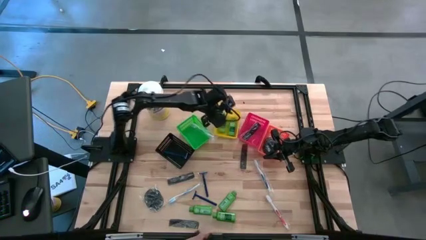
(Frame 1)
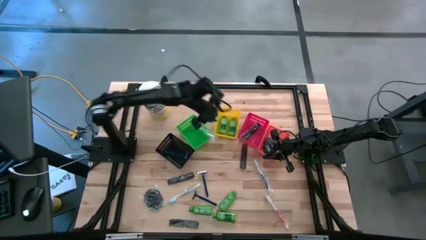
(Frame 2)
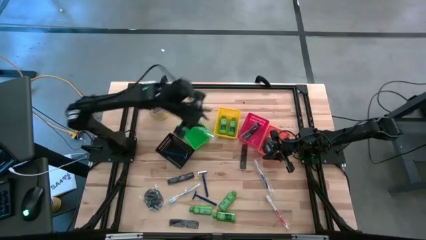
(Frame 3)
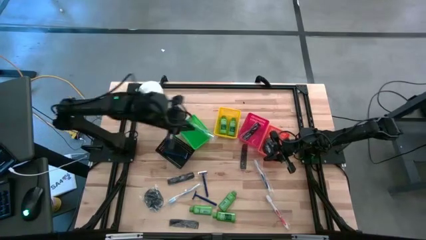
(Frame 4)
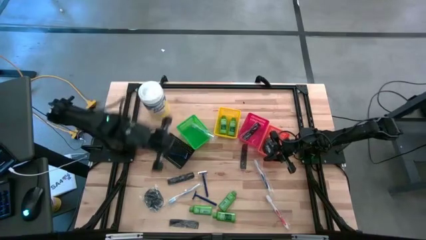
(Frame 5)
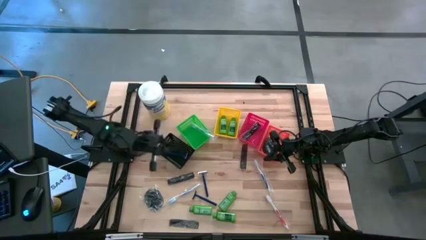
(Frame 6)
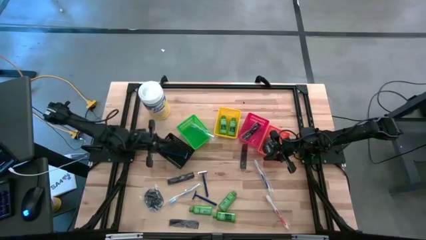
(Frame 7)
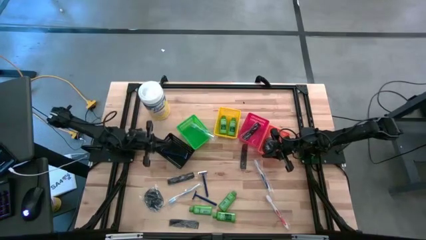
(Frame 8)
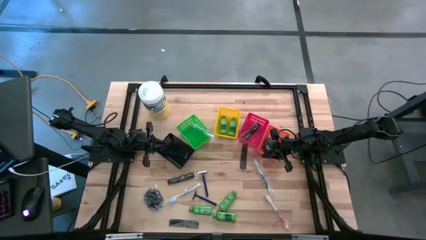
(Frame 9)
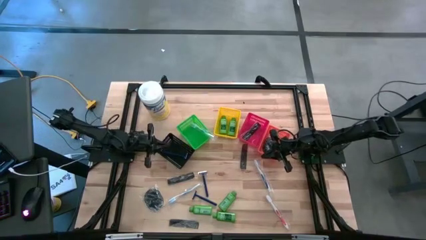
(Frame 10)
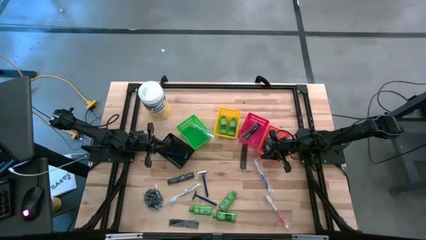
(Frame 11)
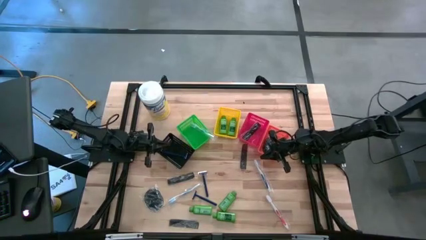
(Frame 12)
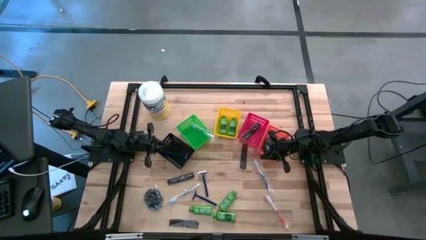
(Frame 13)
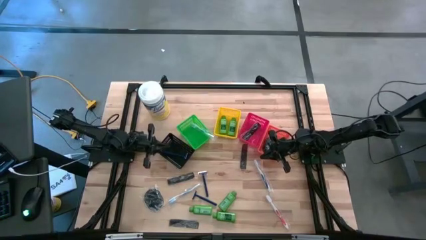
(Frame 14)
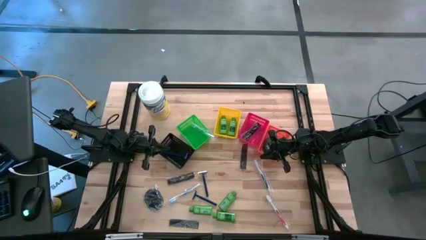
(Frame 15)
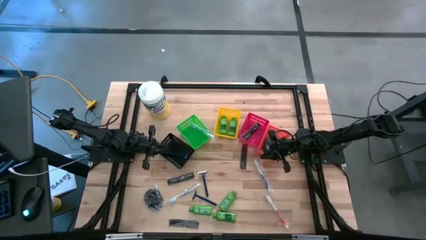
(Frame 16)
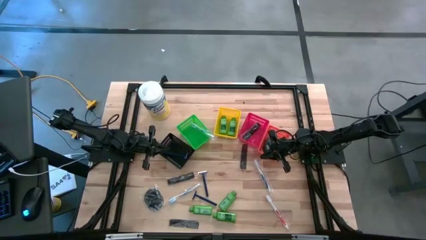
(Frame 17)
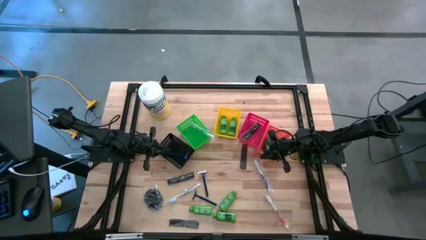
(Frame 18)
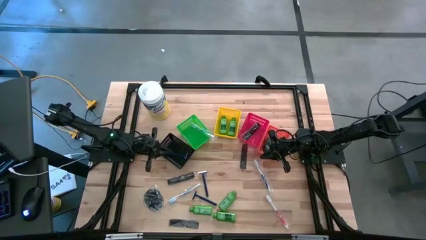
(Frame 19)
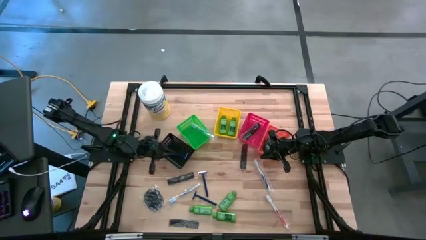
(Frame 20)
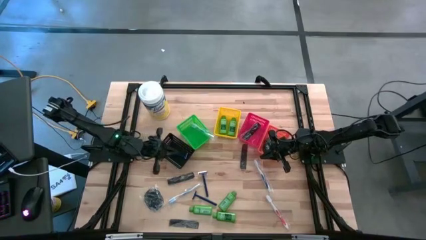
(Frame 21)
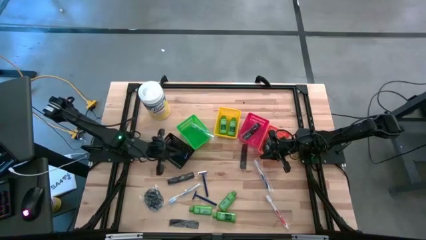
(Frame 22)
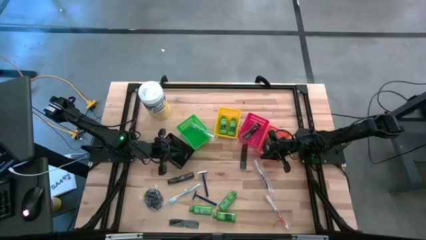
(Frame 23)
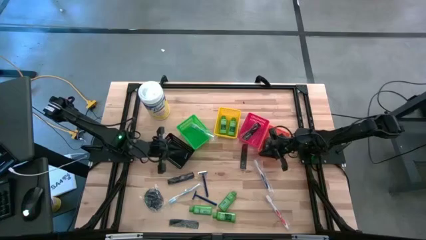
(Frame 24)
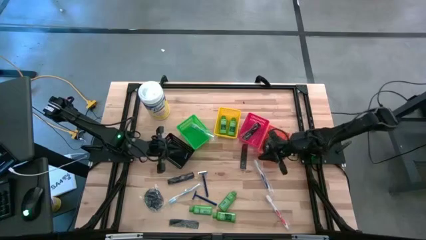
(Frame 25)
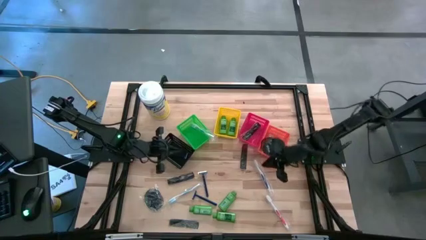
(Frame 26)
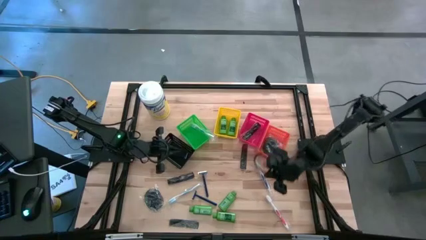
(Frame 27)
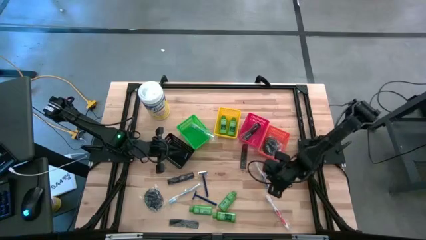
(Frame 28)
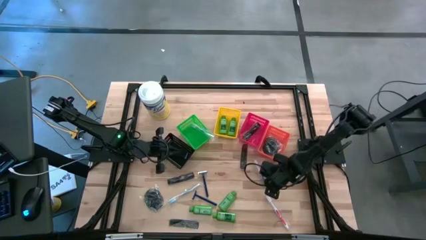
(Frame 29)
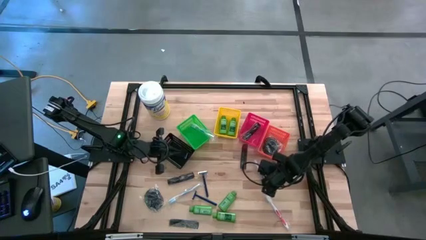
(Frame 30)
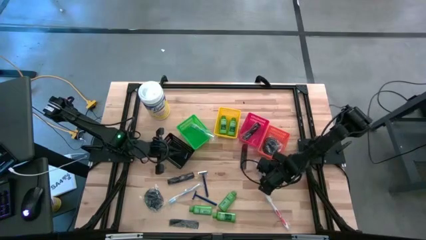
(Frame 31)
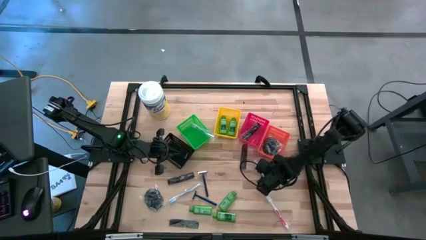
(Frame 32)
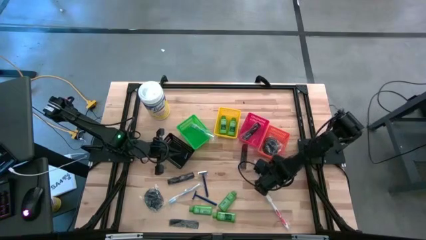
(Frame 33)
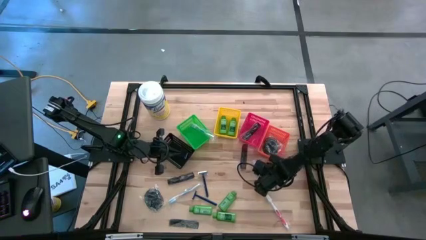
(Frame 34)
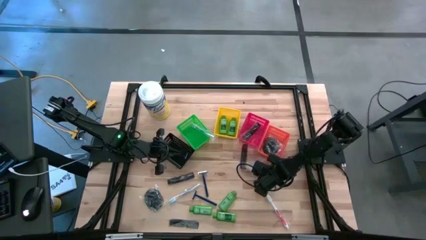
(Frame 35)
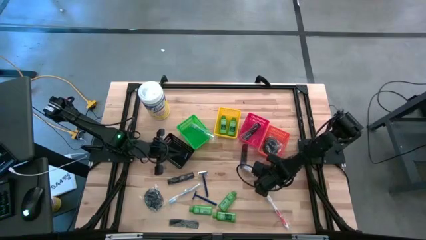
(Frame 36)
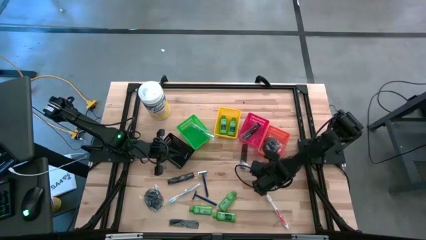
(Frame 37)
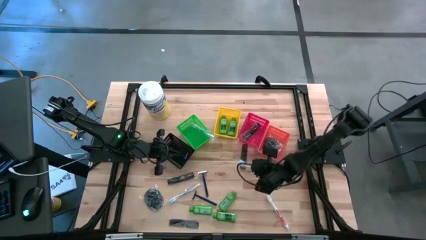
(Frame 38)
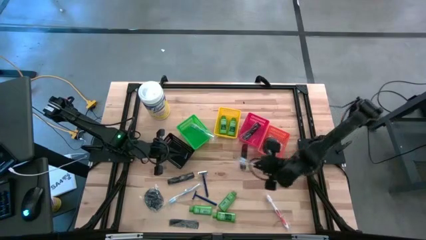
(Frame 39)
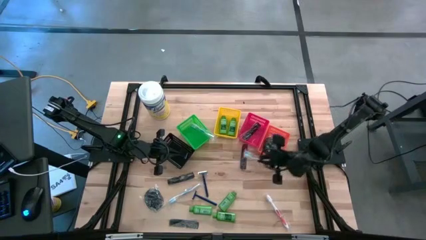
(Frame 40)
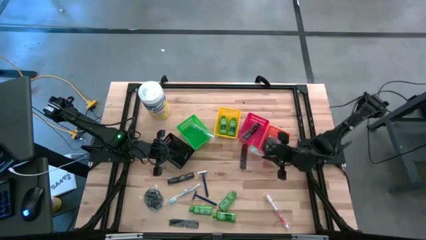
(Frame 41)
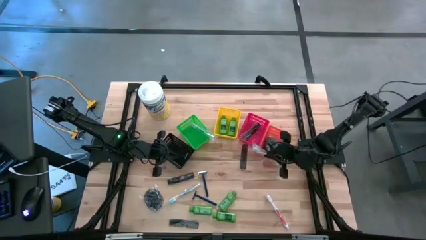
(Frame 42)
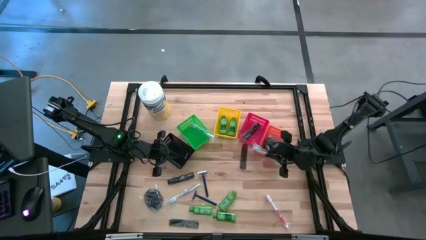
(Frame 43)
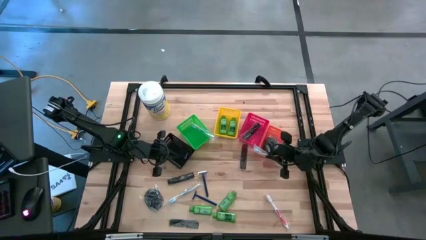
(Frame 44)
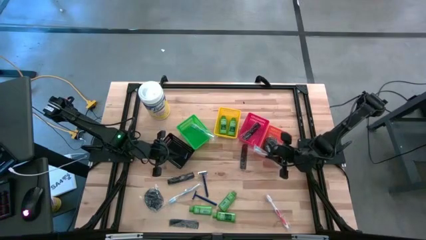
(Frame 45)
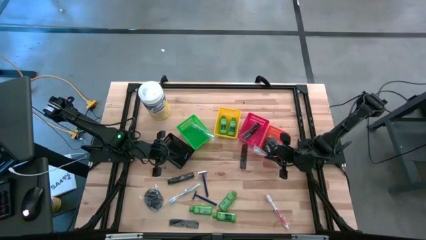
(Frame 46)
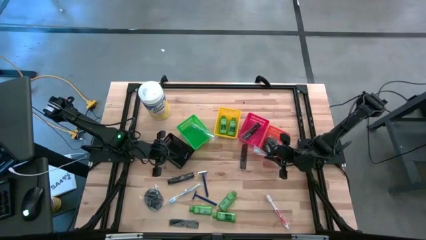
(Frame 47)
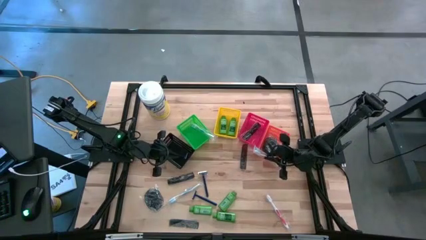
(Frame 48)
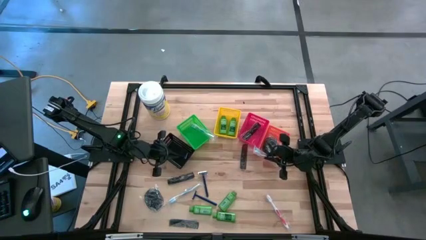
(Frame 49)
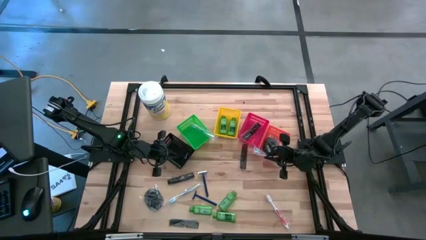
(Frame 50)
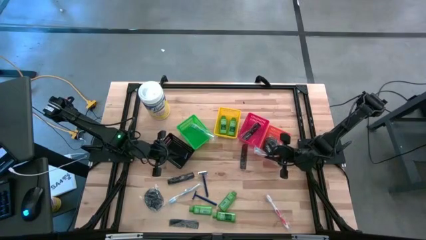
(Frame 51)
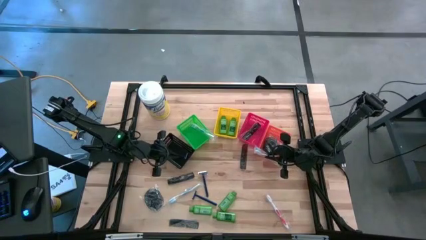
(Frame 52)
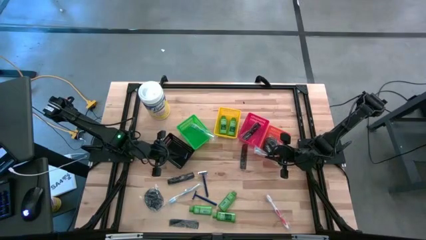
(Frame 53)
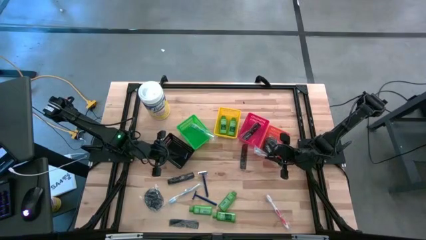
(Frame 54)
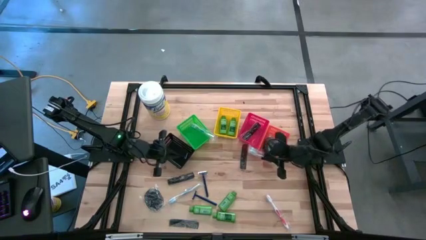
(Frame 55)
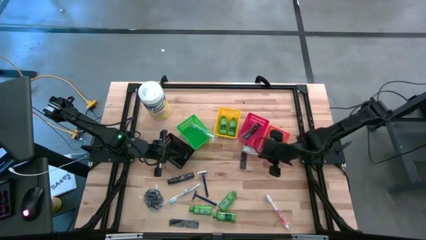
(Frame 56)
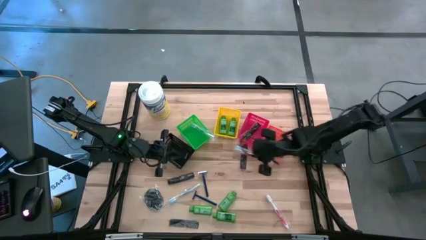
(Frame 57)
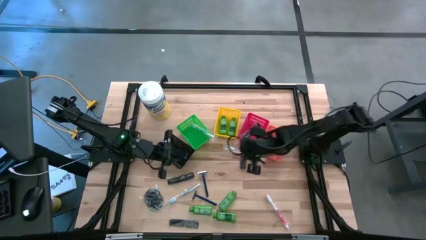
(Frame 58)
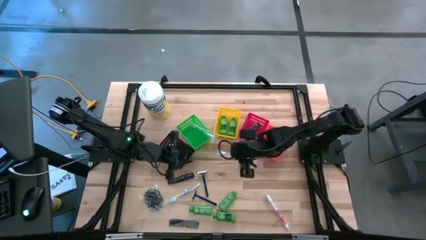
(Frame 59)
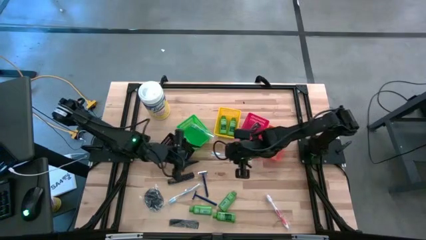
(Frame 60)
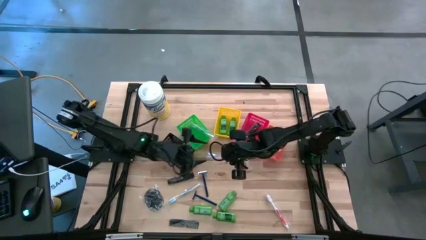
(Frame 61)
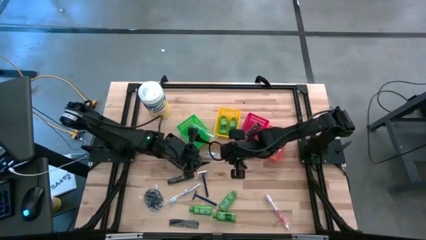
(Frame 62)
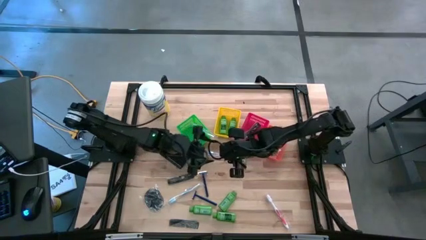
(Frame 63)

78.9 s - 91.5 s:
Task: Pick & Place Travel size toiletries
Put the blue toothbrush into the green bin

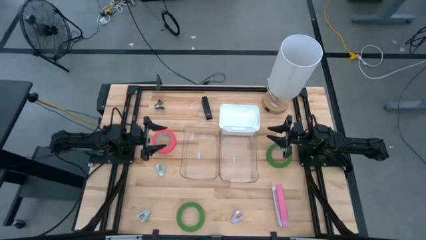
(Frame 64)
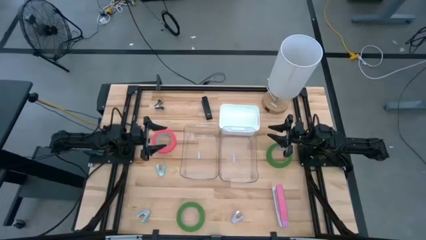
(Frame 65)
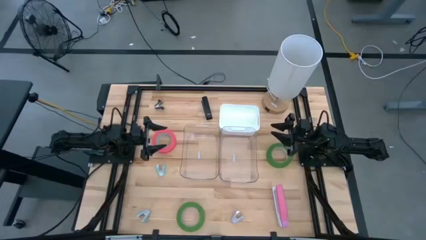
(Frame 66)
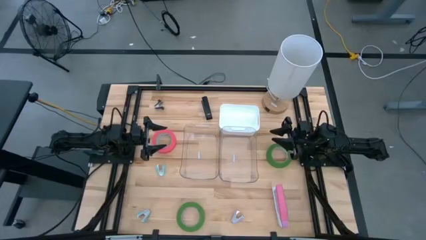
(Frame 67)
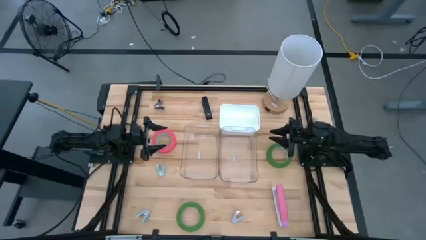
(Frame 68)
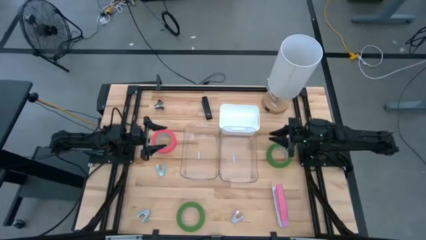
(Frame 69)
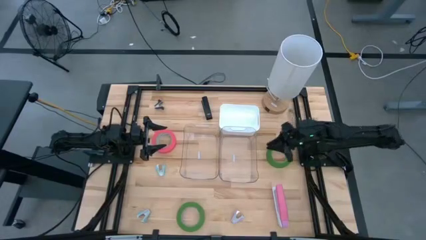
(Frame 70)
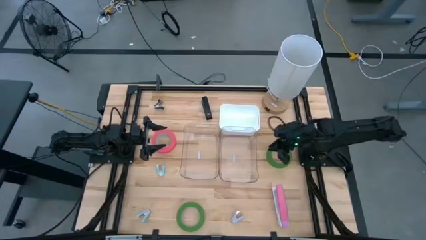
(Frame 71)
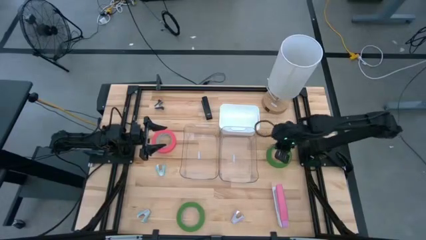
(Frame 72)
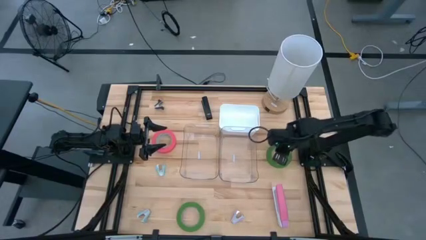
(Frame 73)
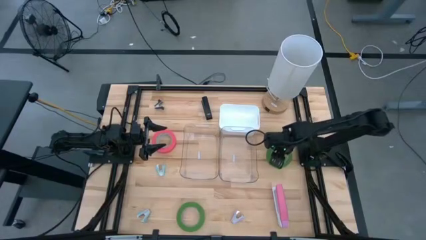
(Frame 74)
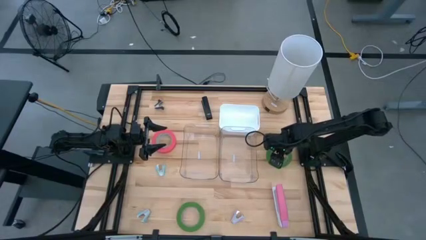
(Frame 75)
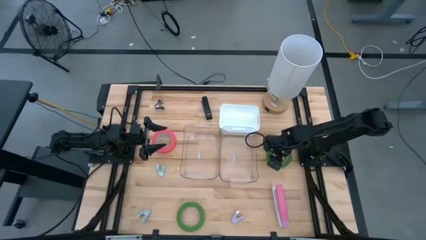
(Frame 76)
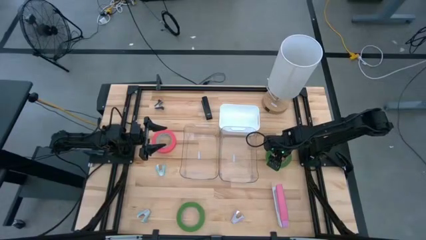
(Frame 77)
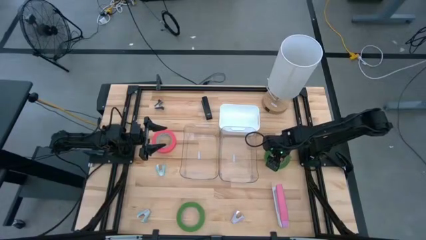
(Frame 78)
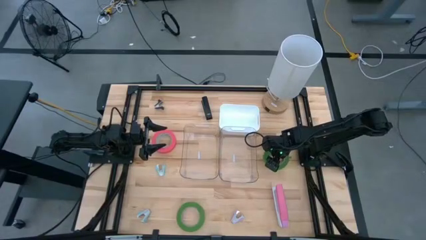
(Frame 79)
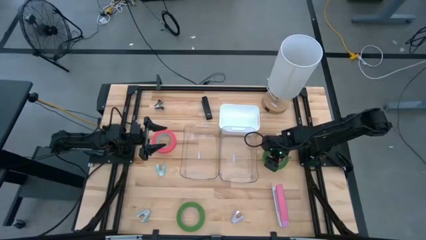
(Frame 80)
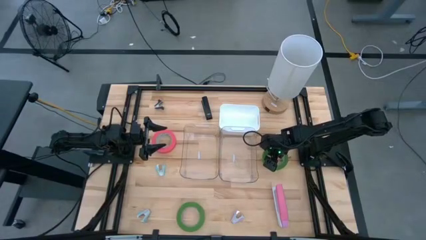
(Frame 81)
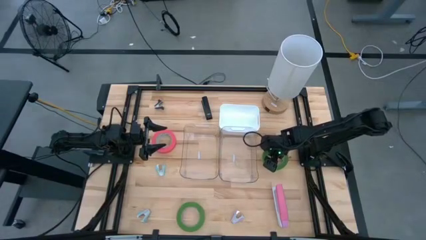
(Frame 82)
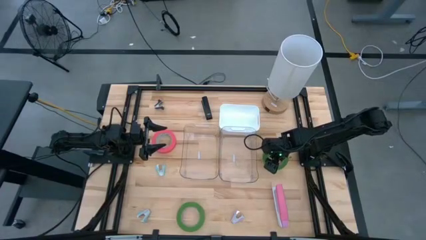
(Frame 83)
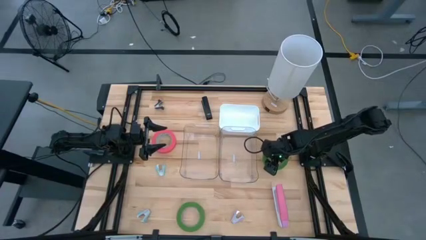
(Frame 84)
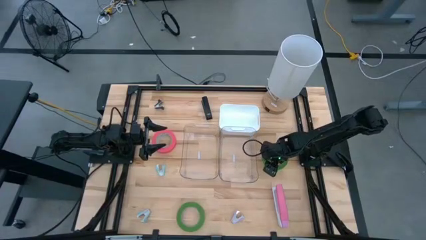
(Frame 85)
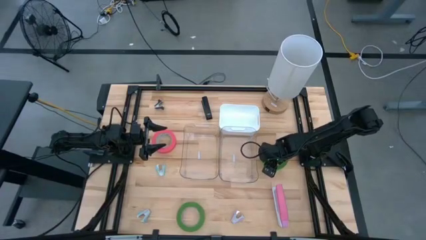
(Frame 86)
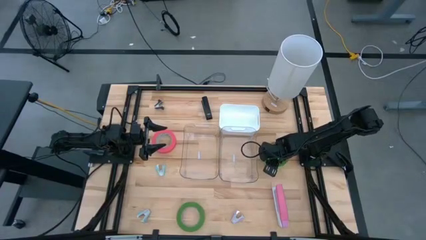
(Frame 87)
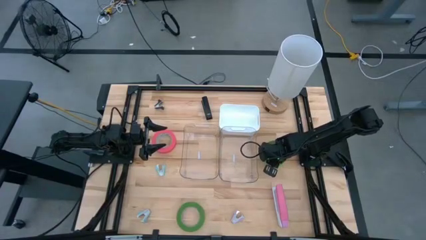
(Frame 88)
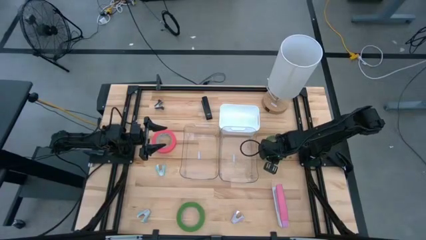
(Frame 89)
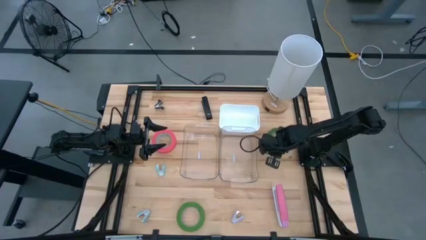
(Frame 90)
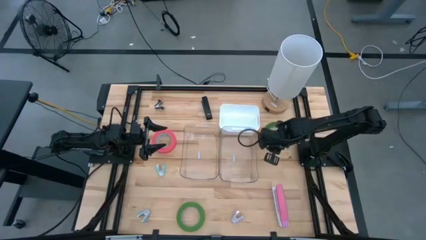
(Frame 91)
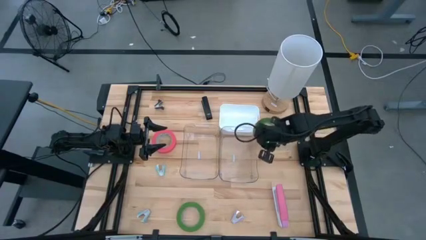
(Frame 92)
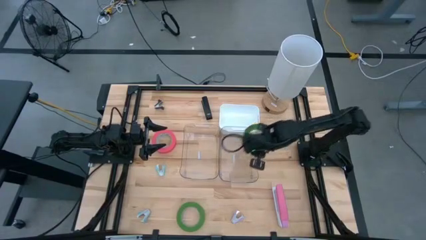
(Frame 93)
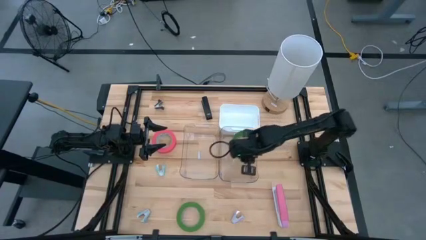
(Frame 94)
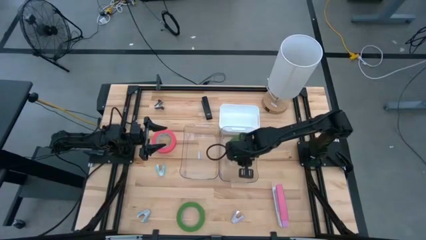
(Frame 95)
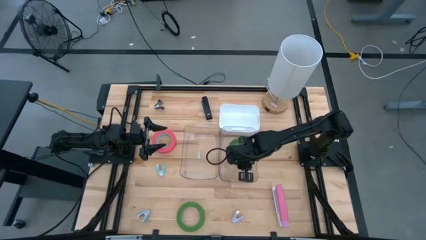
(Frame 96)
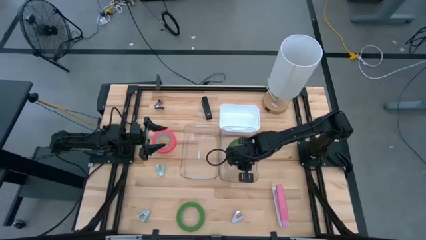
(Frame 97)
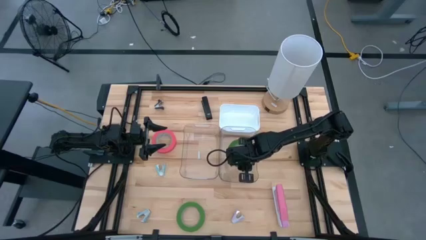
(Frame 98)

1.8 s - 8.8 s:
Task: Pick and place Stapler, Stapler remover, tape
Put the top green tape into the right transparent bin
